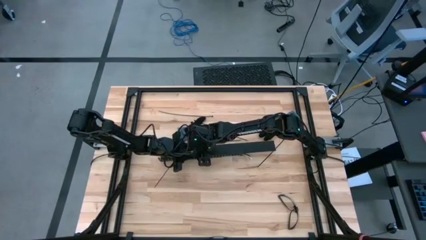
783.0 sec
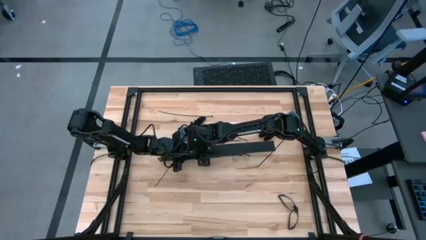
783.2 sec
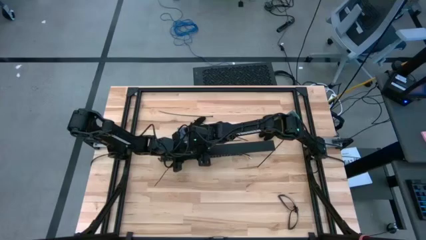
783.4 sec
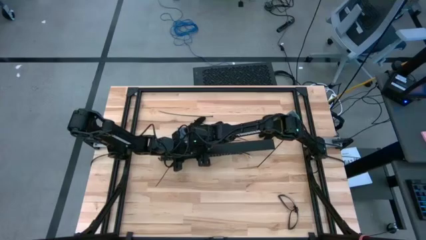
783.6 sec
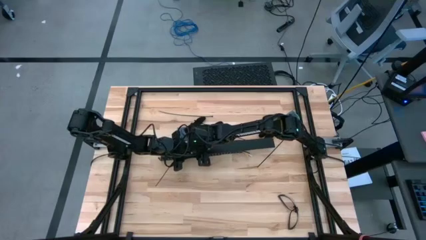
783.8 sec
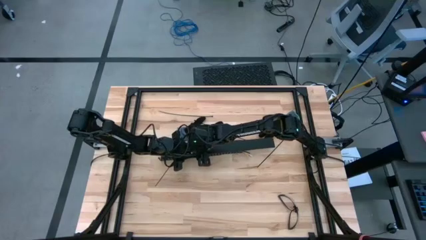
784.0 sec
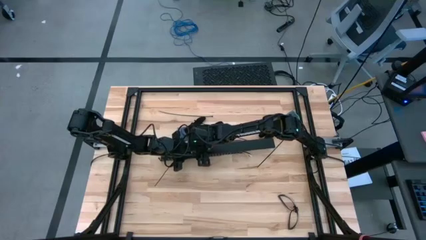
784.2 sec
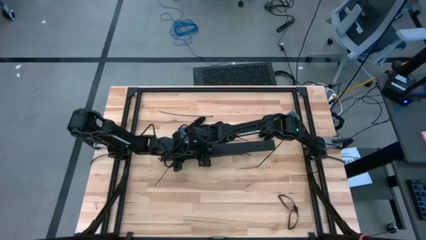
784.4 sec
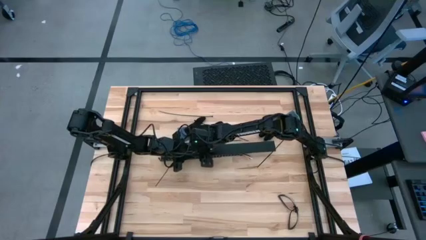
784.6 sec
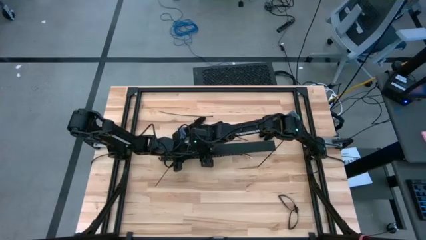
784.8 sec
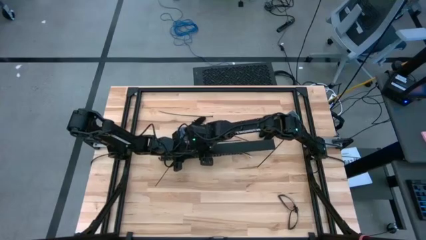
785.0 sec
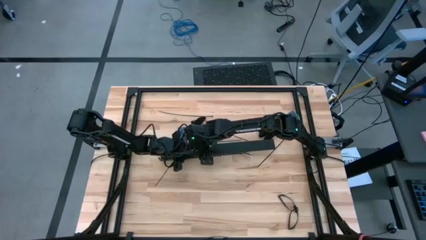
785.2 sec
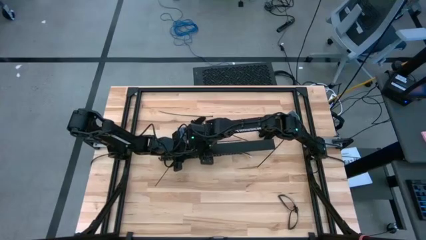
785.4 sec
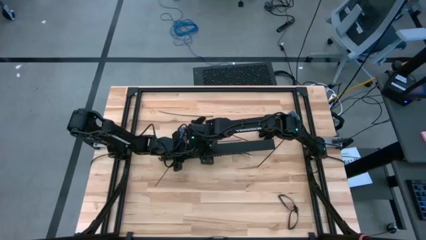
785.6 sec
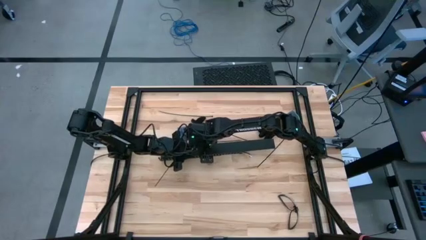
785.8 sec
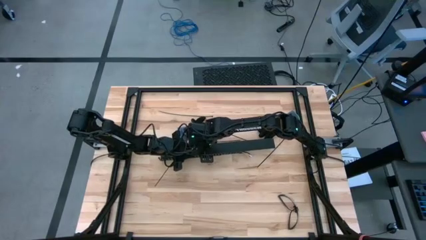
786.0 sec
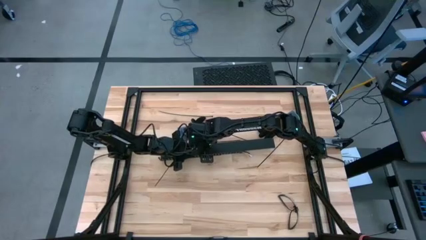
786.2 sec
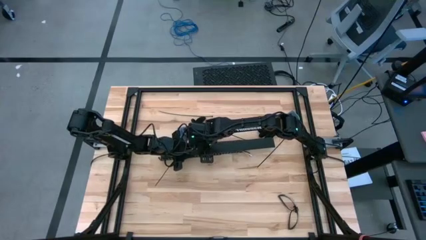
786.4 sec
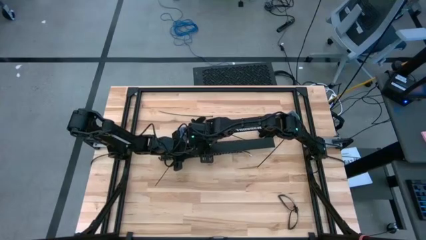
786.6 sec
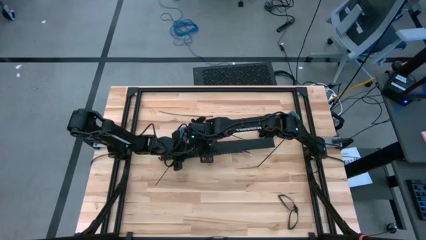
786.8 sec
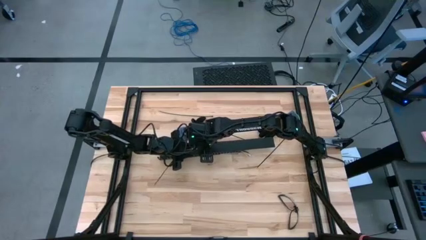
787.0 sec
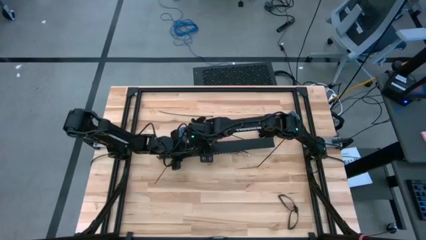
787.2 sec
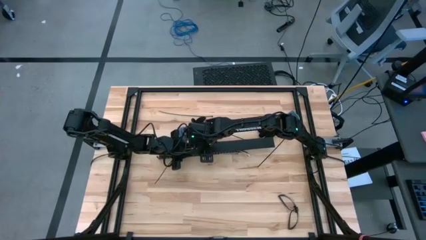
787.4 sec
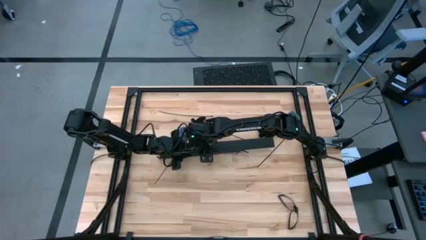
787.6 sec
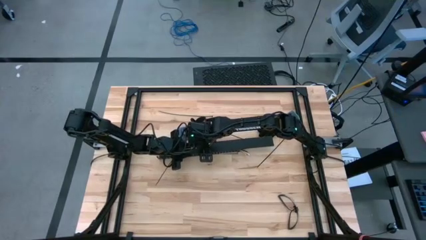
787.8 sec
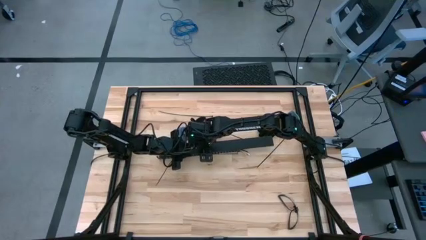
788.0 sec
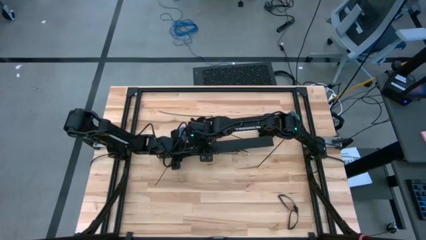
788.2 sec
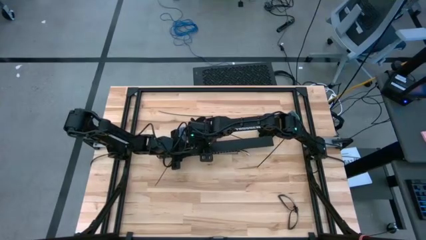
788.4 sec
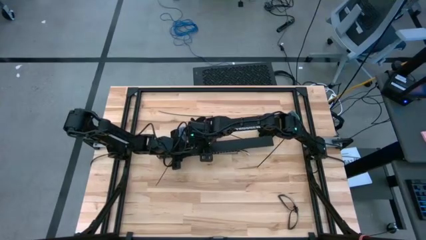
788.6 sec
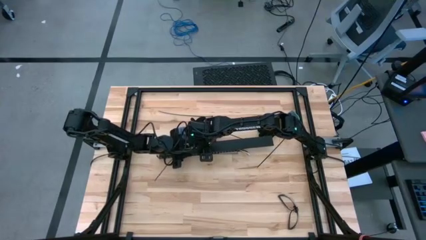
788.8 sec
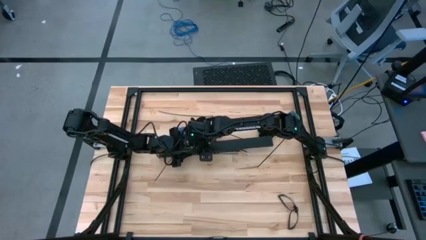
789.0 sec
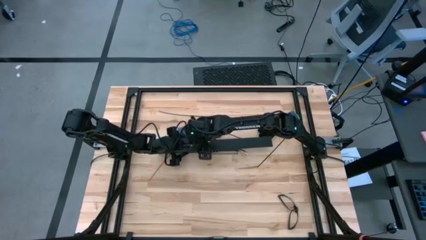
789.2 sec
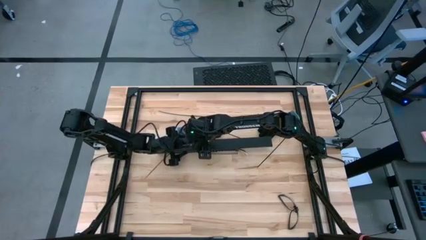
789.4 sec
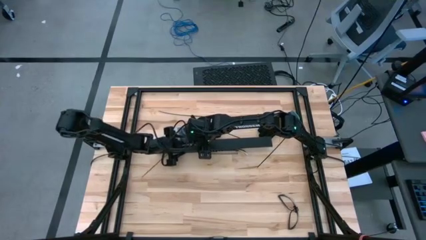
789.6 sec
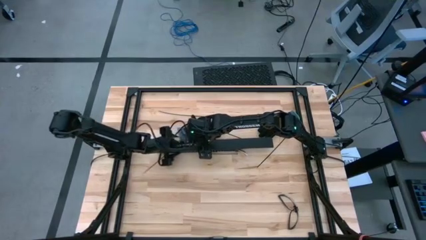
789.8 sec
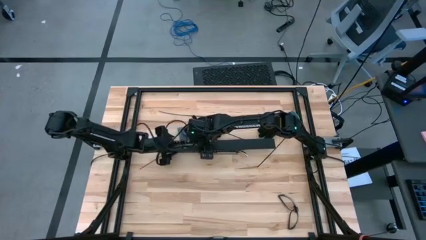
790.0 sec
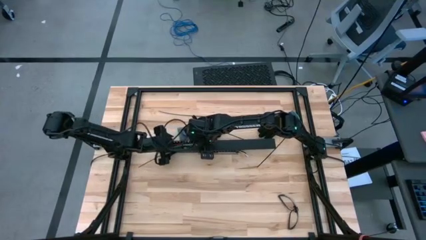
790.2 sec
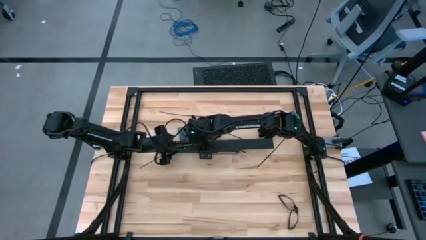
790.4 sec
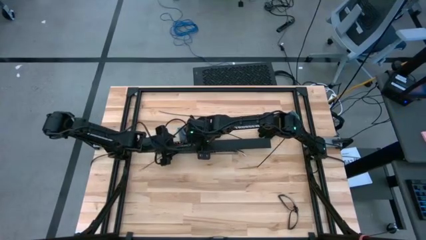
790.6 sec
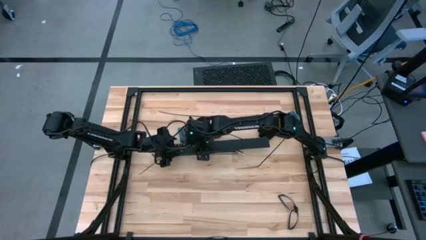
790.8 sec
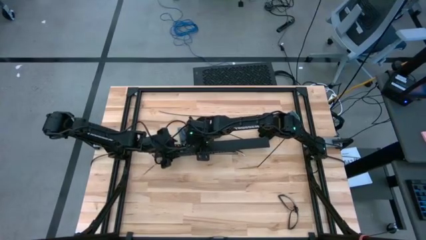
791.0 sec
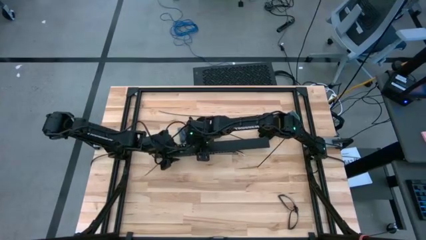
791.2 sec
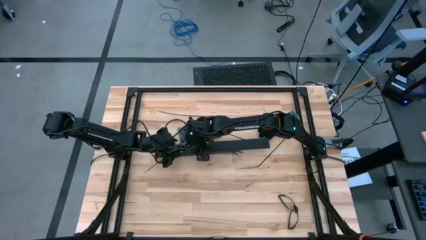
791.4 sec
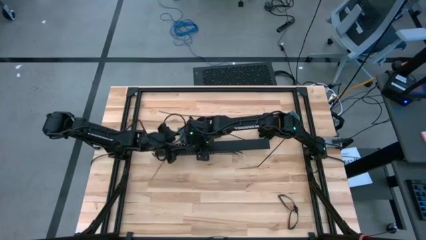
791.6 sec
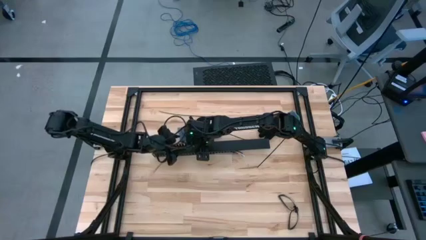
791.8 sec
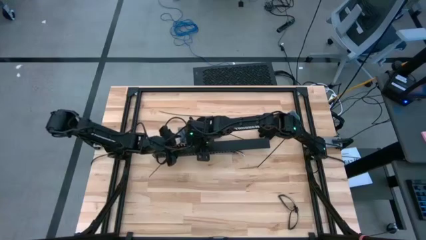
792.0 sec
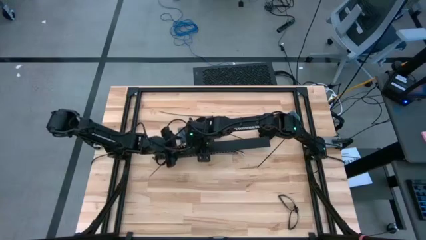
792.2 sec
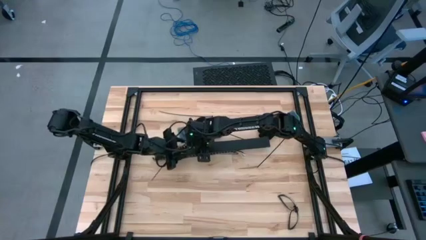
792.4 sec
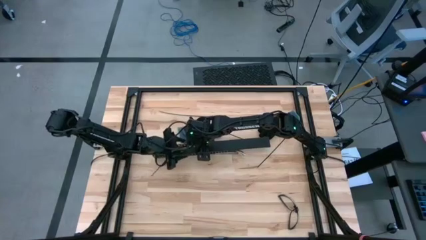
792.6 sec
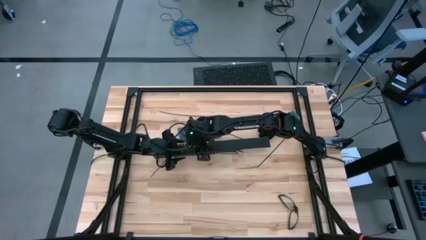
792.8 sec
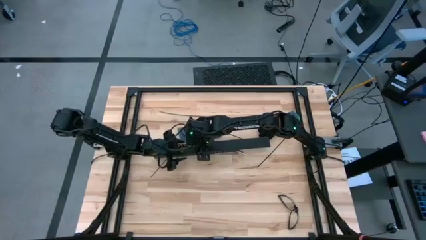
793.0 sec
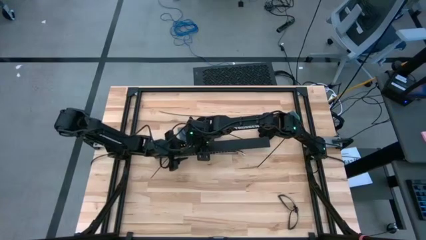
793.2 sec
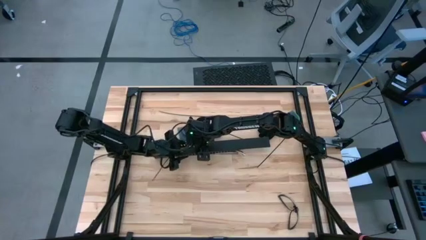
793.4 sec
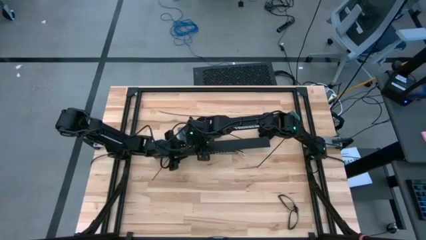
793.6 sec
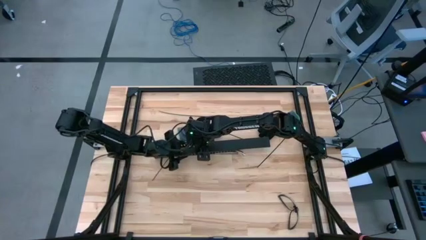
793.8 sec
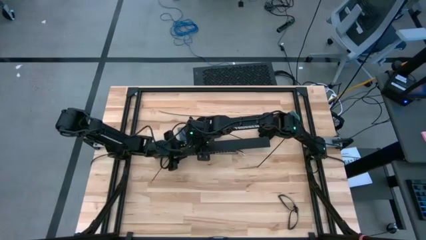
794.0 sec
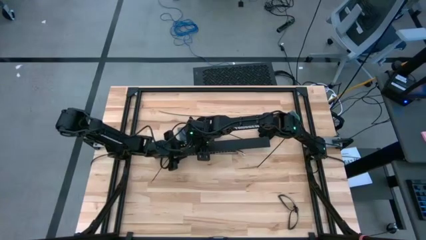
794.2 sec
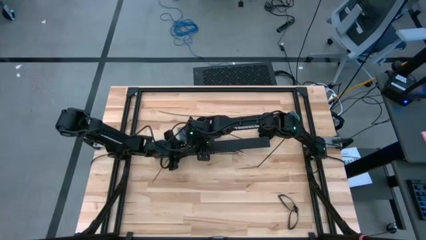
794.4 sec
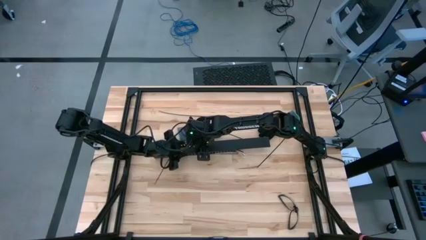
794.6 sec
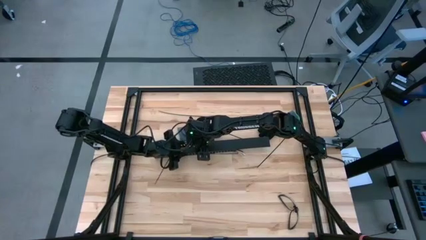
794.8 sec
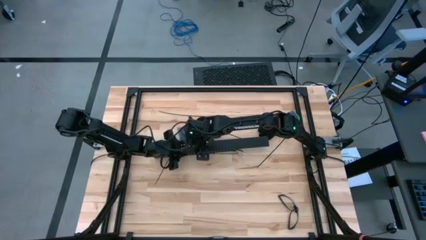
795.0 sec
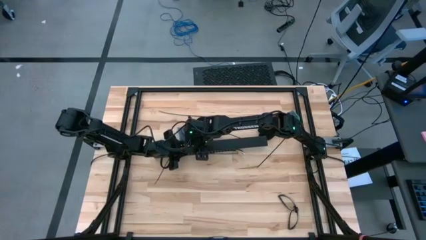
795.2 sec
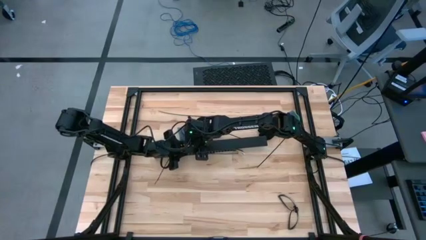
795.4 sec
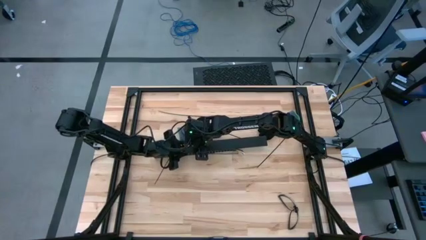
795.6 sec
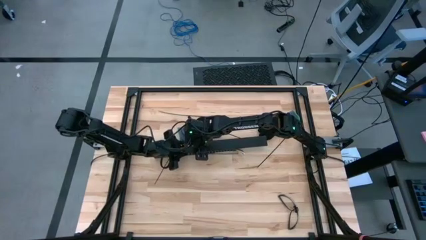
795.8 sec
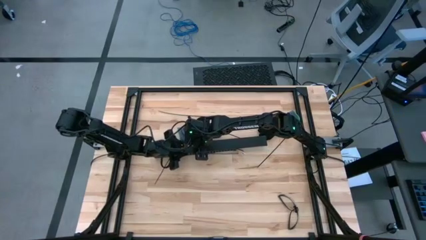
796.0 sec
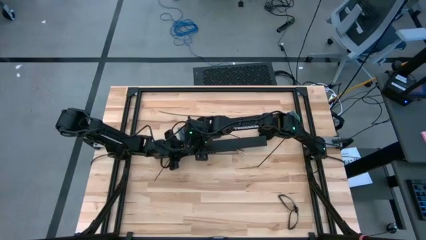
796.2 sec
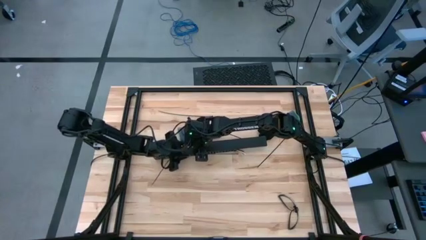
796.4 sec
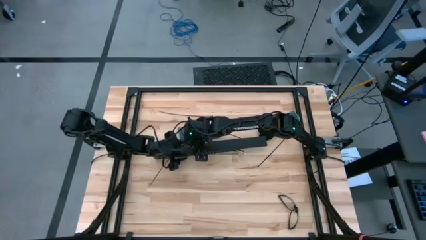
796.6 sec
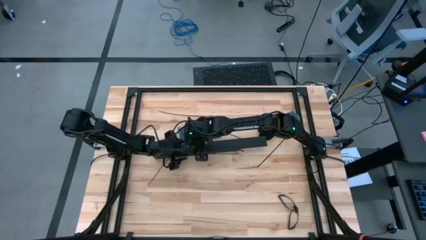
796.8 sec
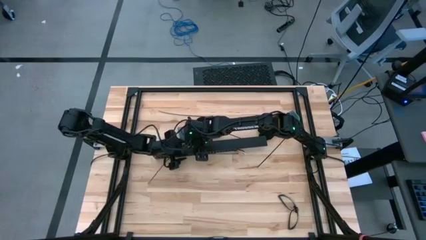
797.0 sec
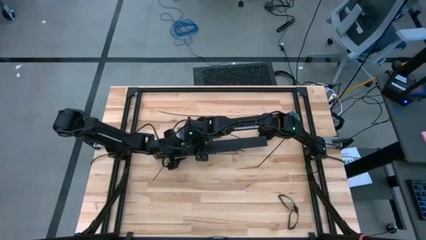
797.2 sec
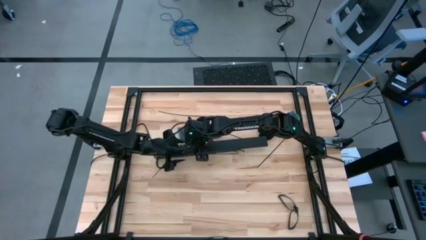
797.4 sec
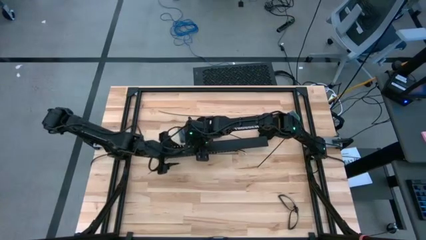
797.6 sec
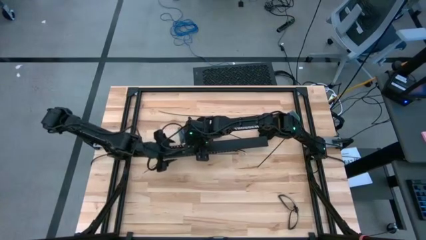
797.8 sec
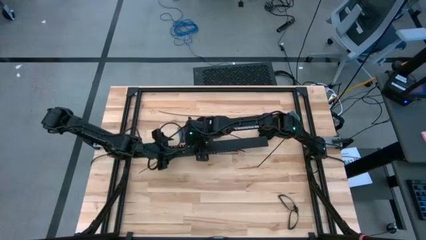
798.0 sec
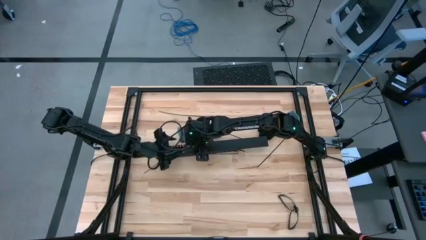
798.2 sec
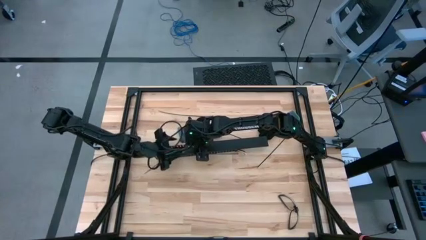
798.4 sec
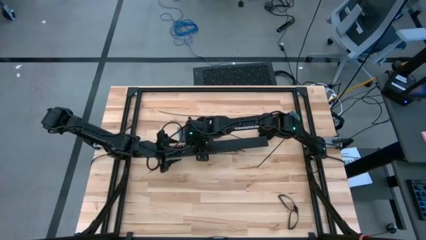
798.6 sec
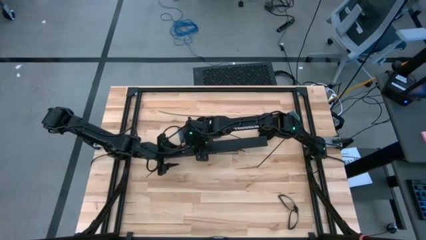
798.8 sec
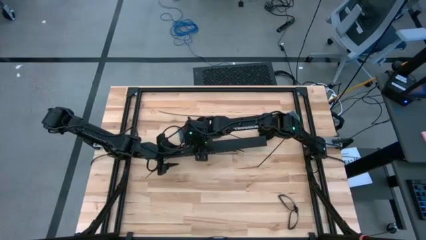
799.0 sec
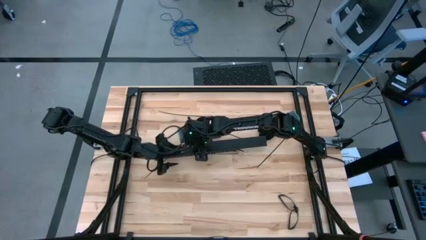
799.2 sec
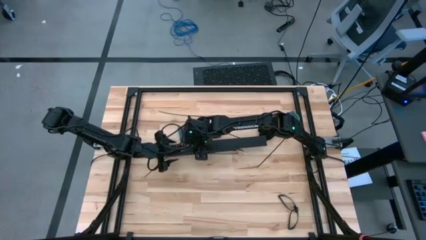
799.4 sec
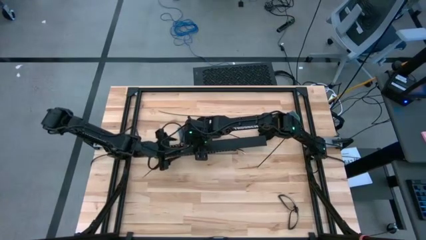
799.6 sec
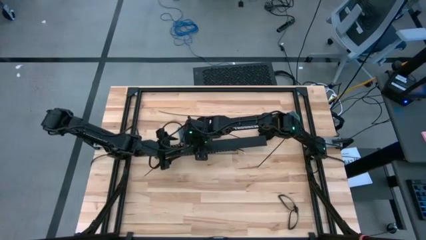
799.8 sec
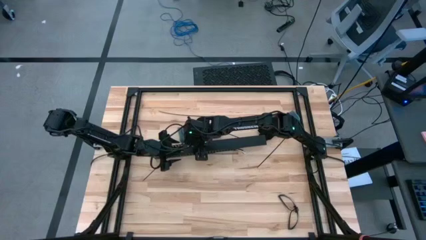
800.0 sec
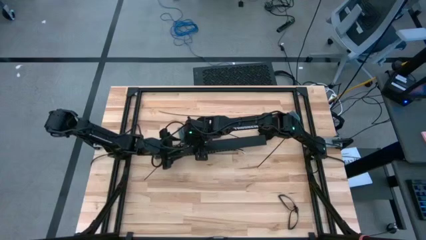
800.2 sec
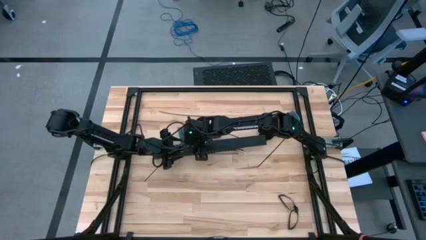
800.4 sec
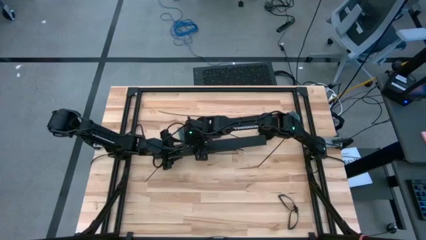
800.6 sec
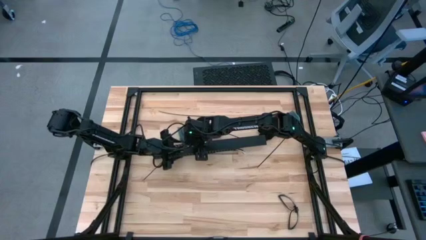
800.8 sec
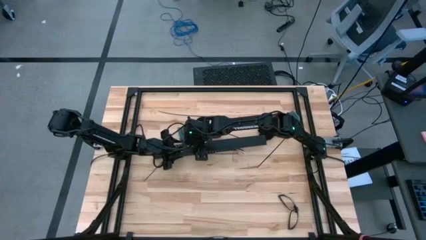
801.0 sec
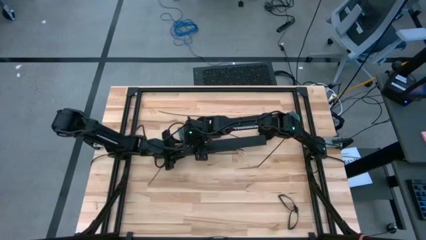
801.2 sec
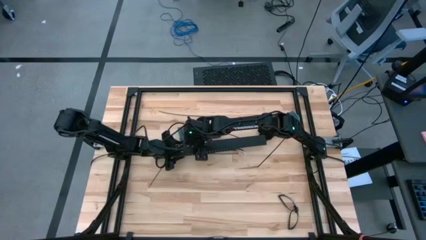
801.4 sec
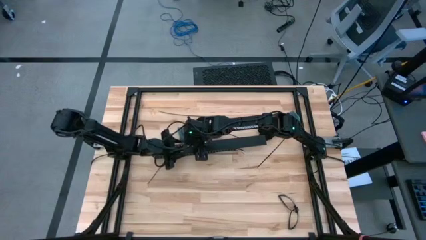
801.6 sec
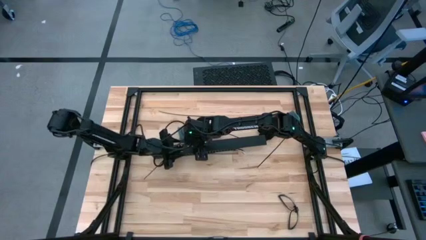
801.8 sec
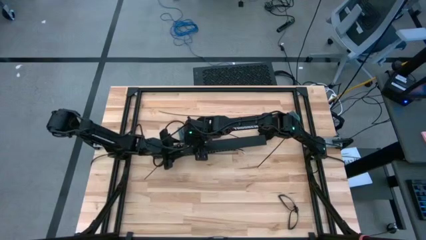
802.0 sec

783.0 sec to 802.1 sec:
Task: Ziptie cables
Close the cable duct
